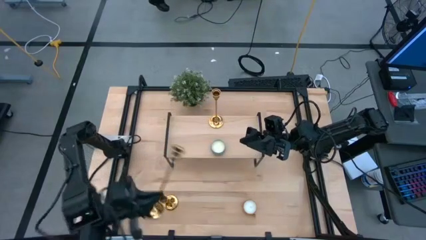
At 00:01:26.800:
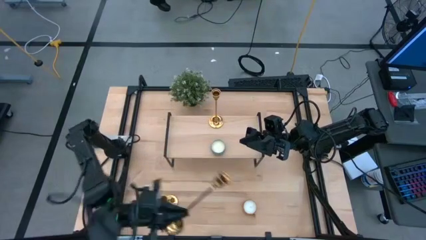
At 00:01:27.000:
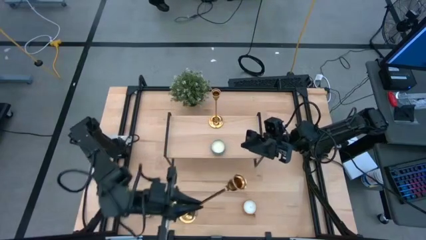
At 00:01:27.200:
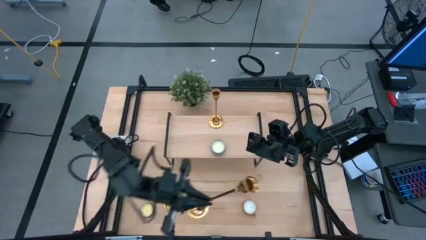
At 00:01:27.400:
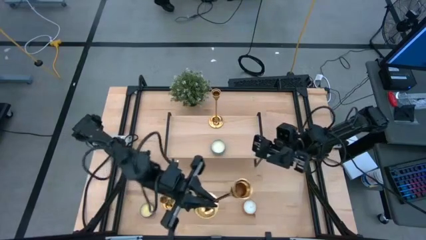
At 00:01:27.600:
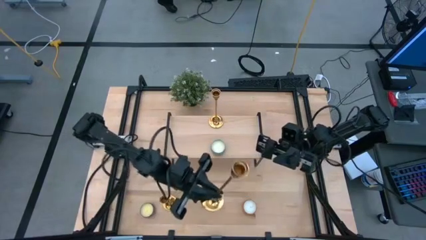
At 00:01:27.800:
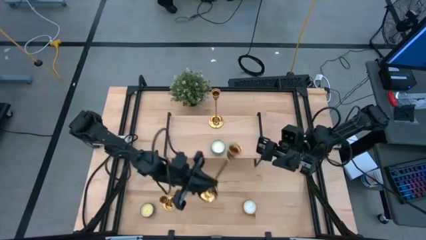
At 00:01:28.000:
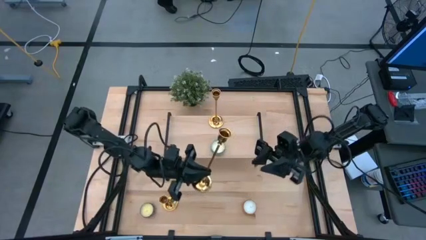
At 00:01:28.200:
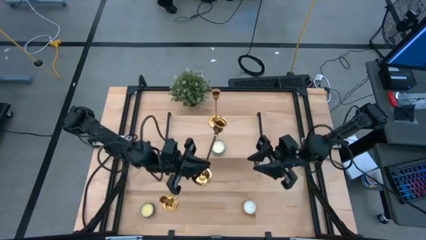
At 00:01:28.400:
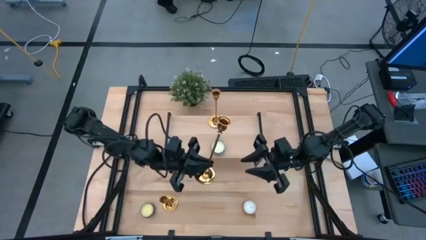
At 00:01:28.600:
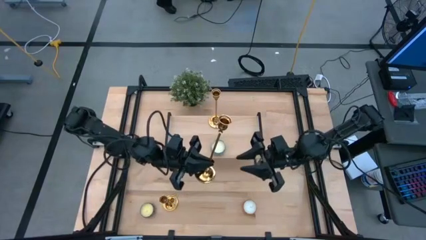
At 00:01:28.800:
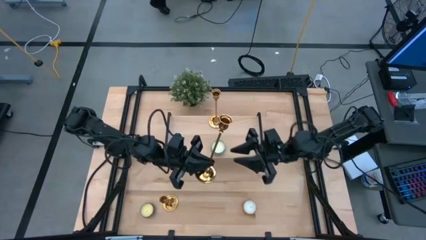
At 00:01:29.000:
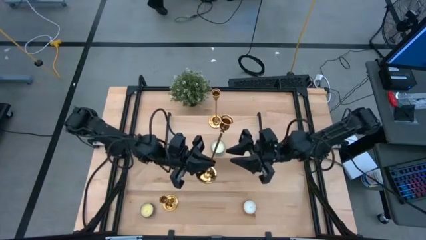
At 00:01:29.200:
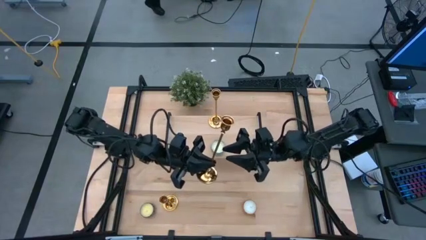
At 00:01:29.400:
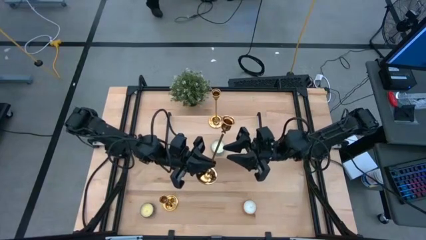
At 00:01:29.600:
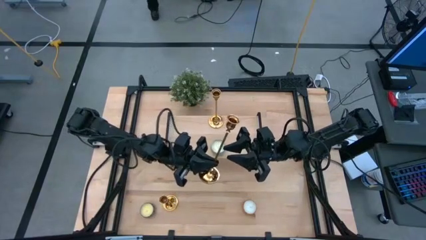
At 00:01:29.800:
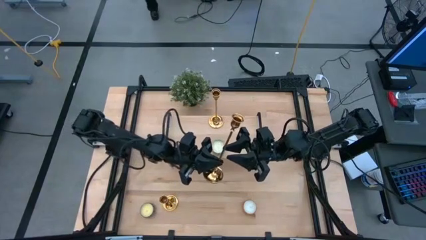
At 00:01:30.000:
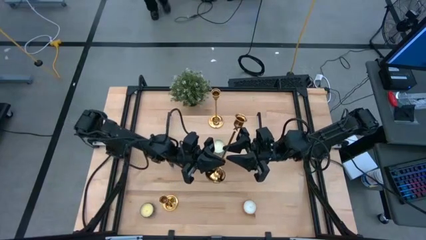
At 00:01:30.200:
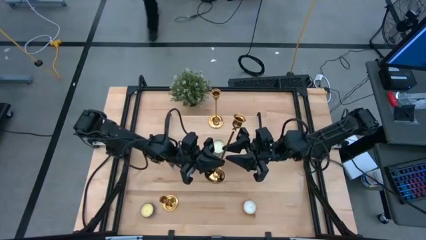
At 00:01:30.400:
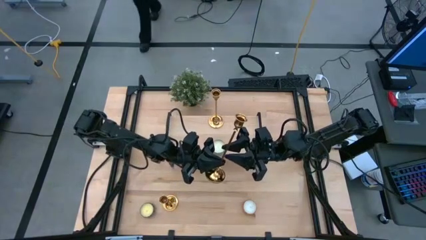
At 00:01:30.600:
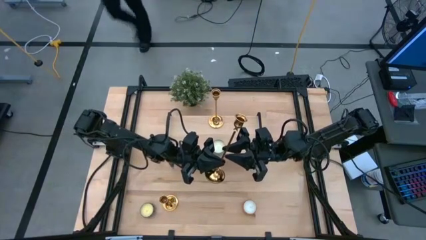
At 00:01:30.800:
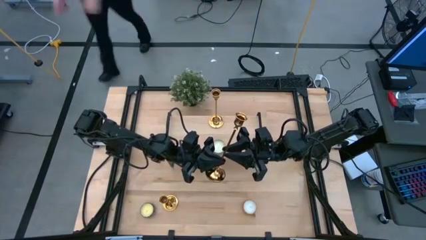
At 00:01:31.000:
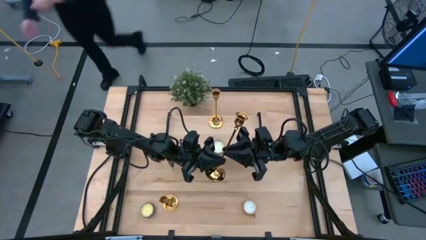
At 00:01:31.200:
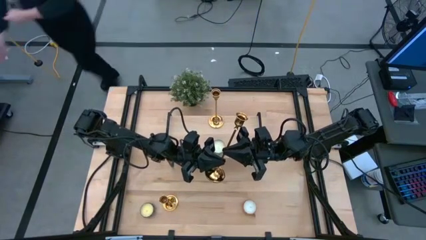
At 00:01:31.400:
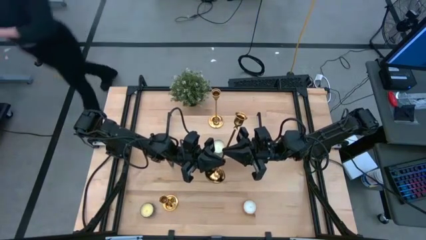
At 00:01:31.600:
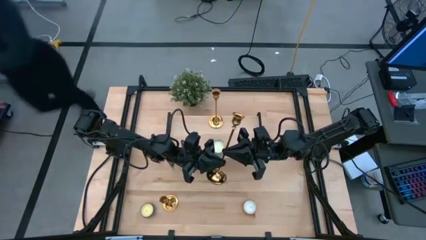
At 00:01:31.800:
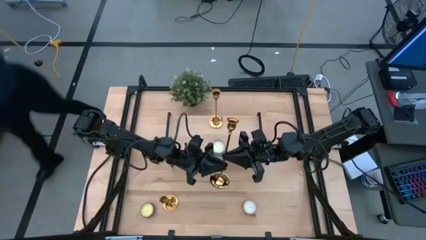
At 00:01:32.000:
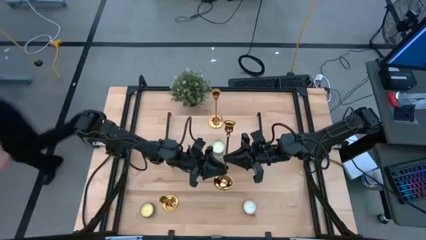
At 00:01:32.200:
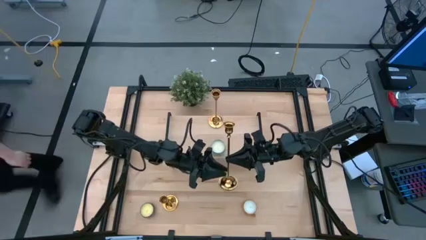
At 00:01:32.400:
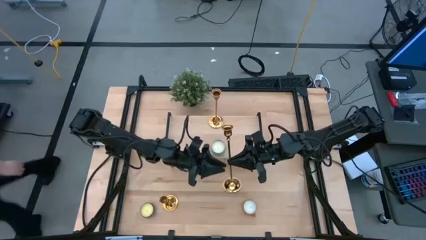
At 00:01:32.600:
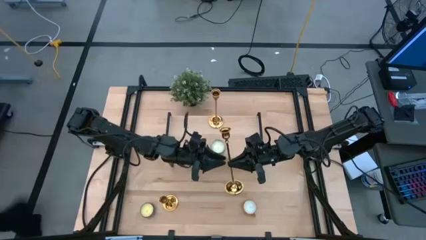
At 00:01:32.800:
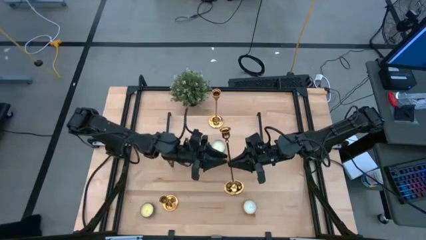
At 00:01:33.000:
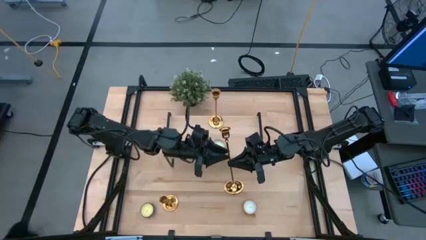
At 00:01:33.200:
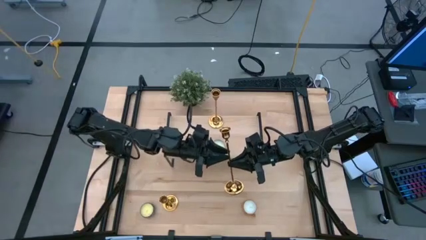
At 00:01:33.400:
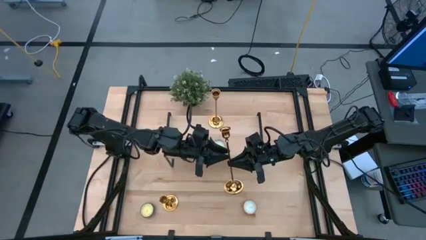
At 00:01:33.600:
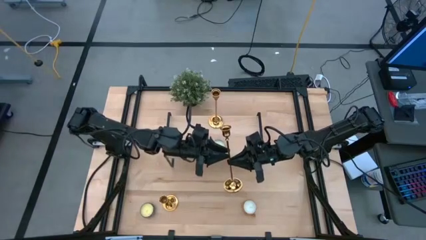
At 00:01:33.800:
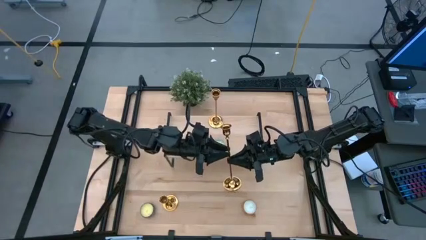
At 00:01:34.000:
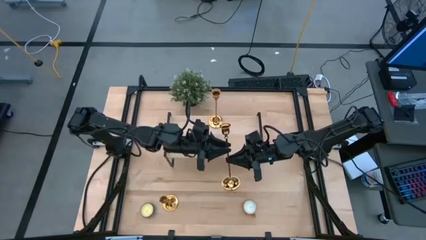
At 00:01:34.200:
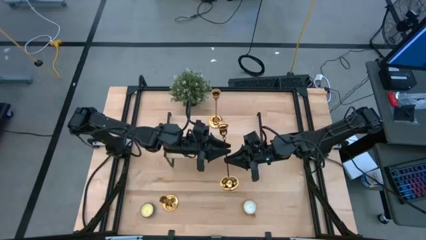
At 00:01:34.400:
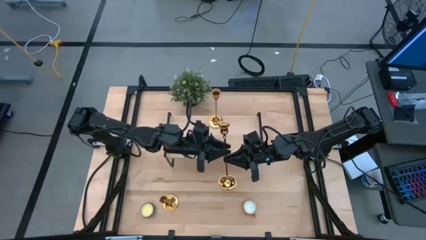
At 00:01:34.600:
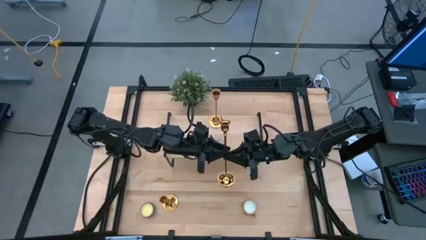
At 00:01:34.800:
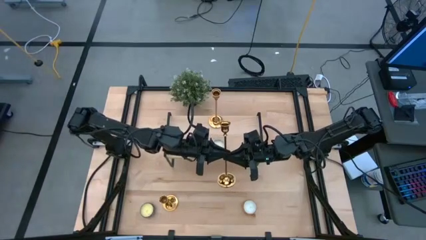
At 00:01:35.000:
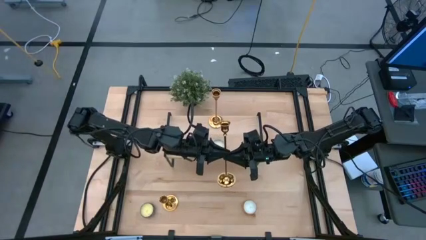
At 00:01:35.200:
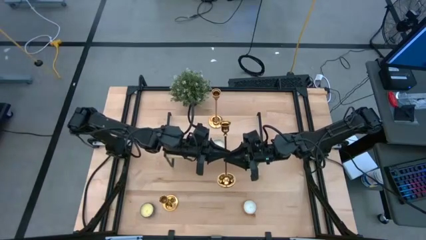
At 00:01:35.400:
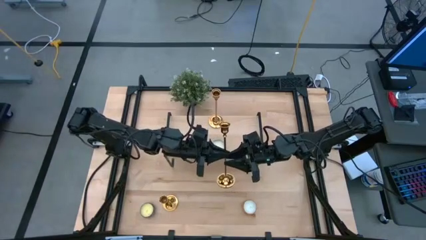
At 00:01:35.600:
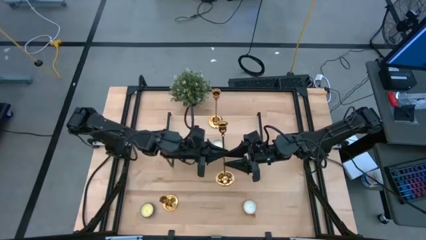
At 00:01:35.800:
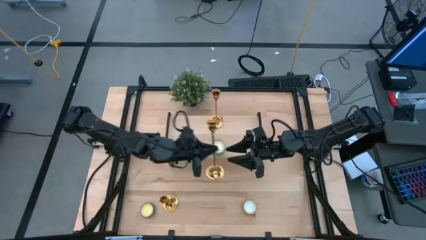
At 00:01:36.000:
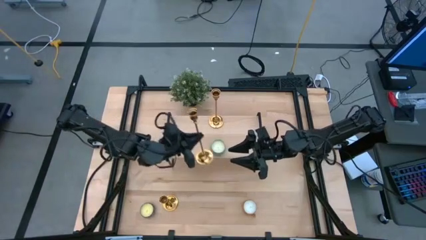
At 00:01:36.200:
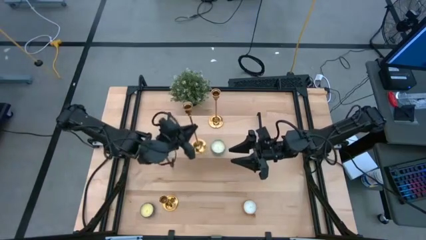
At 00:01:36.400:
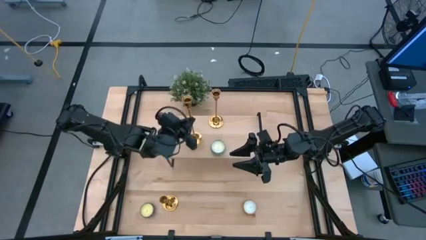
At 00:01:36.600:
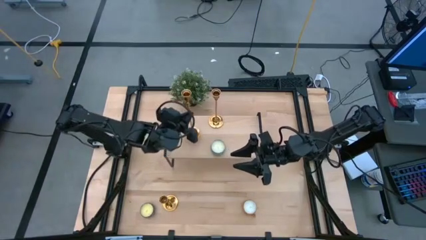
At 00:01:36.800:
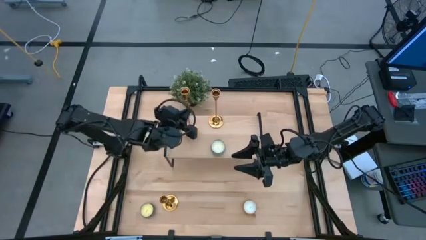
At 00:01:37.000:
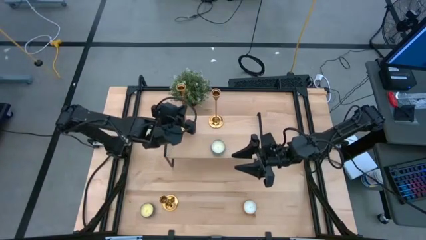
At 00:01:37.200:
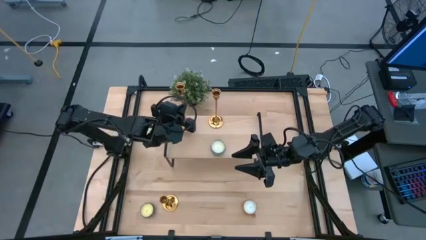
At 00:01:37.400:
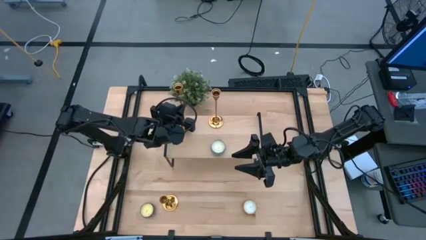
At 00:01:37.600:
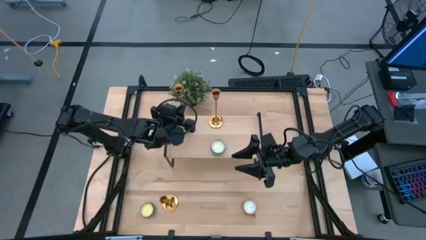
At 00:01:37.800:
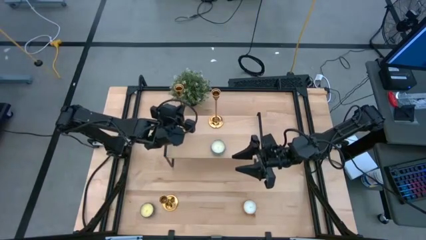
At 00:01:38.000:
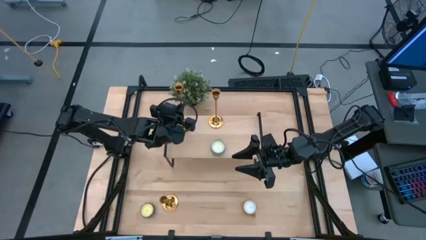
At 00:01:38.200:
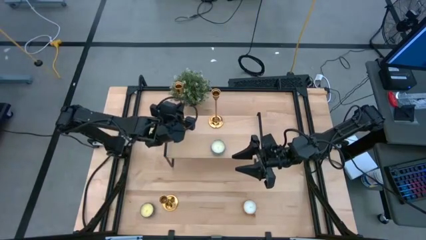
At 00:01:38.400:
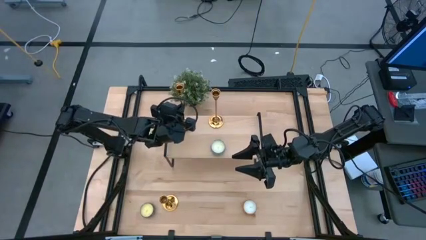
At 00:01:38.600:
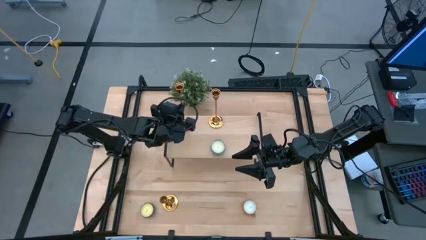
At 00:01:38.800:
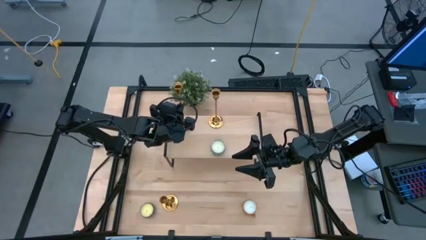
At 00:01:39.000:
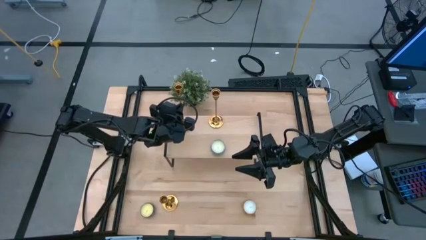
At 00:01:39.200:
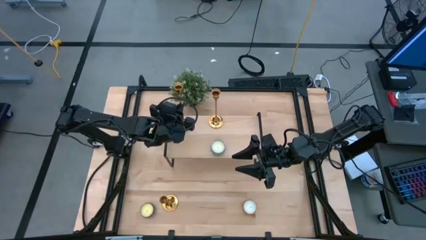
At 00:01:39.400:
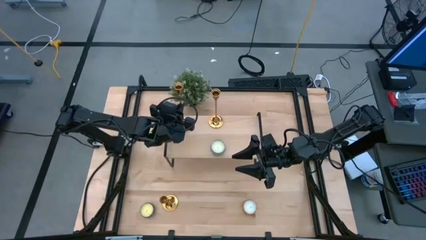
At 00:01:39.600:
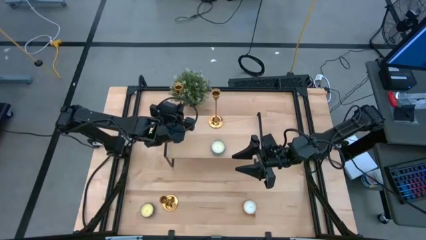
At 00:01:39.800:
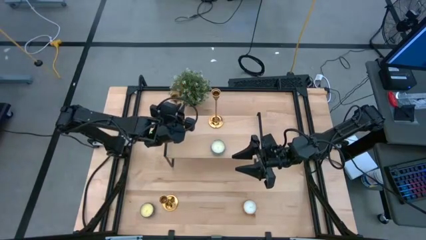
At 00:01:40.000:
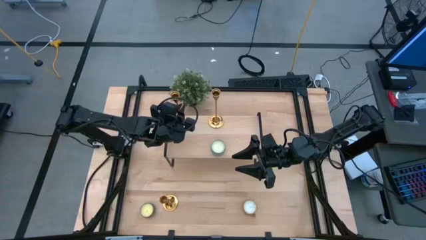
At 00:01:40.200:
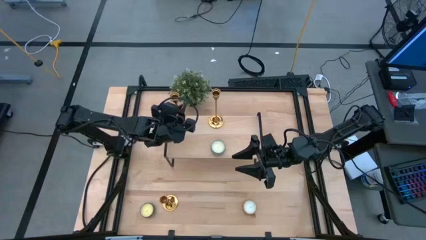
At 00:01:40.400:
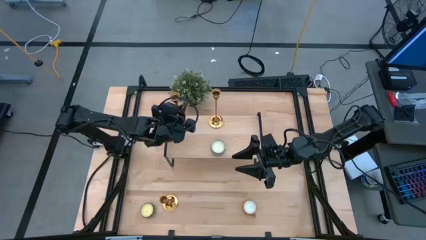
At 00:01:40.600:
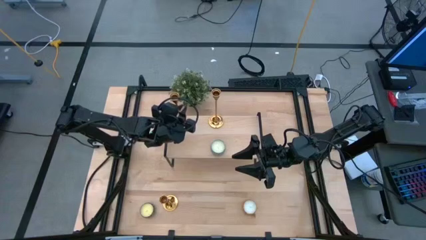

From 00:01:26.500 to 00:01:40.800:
Task: Stock candles and holders on shelf
Align the right gold candle holder with the other gold candle holder on the shelf
